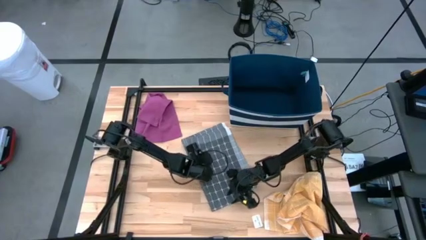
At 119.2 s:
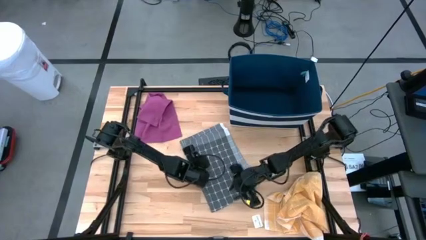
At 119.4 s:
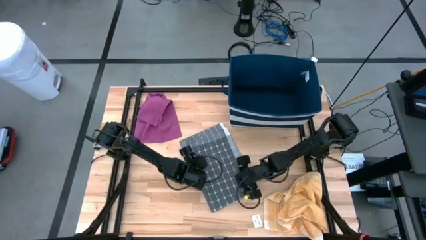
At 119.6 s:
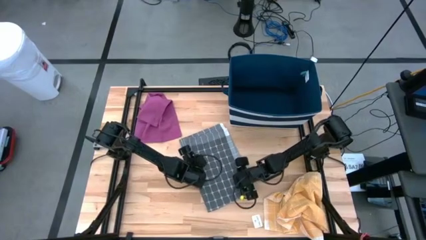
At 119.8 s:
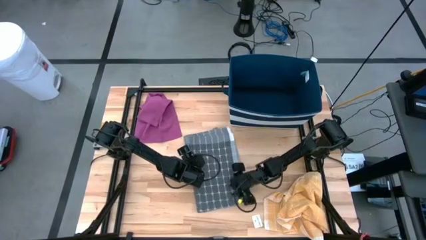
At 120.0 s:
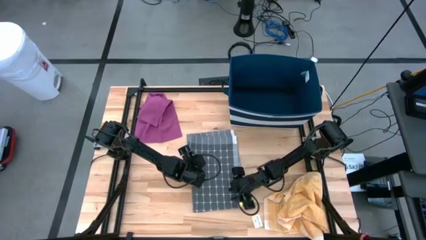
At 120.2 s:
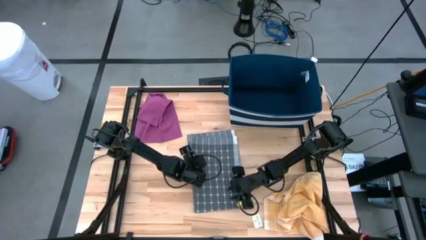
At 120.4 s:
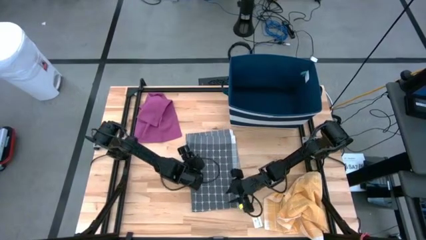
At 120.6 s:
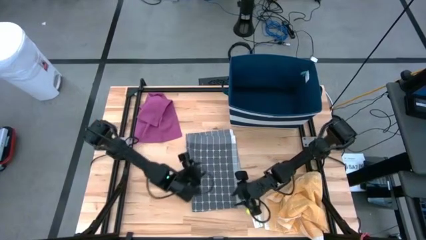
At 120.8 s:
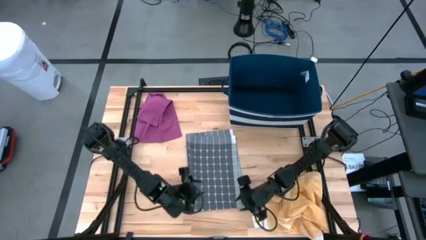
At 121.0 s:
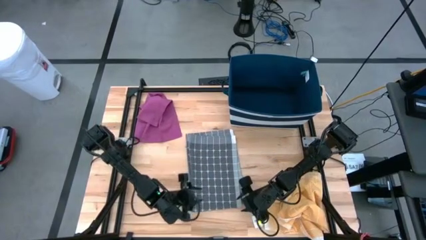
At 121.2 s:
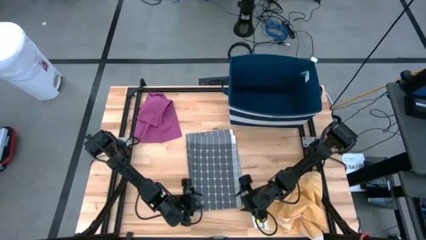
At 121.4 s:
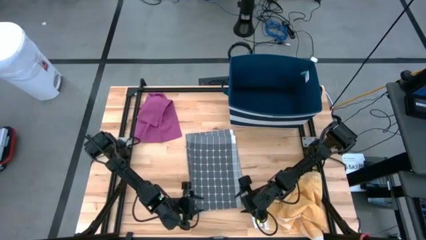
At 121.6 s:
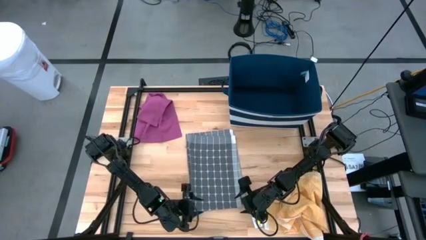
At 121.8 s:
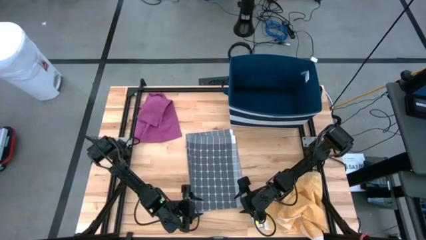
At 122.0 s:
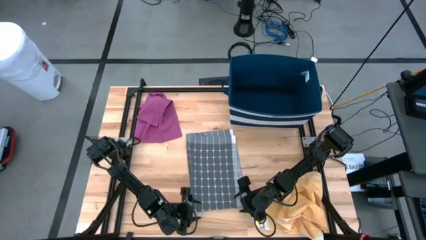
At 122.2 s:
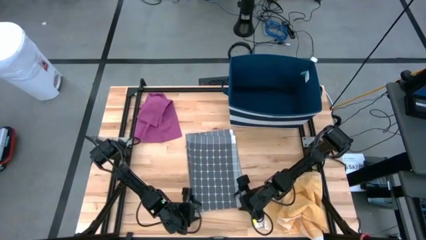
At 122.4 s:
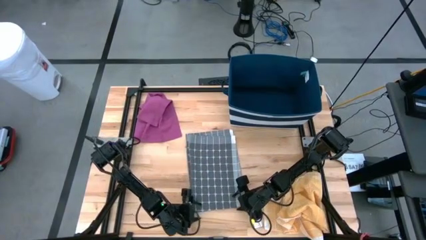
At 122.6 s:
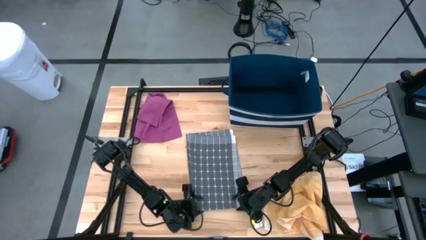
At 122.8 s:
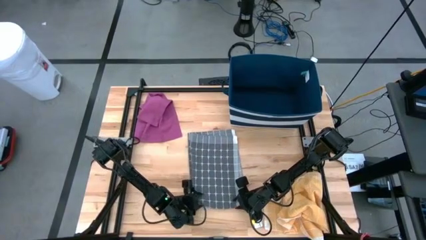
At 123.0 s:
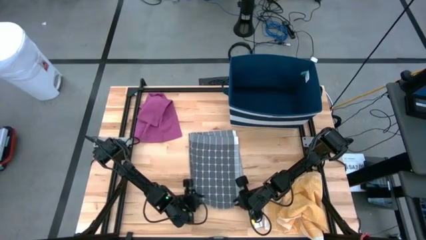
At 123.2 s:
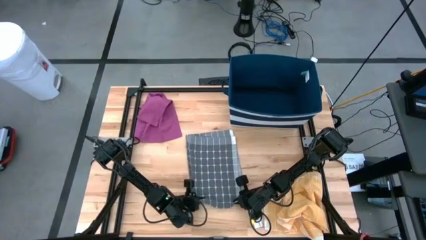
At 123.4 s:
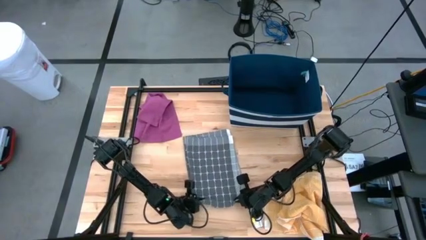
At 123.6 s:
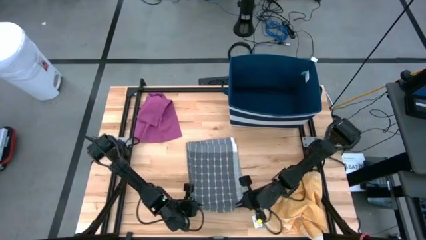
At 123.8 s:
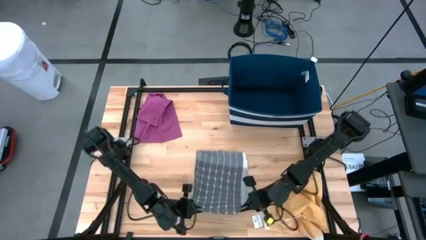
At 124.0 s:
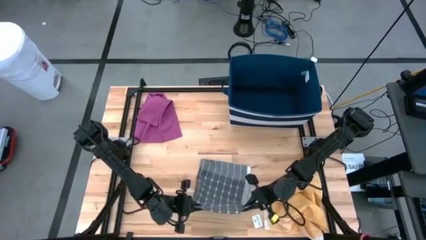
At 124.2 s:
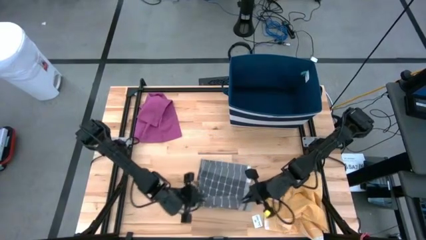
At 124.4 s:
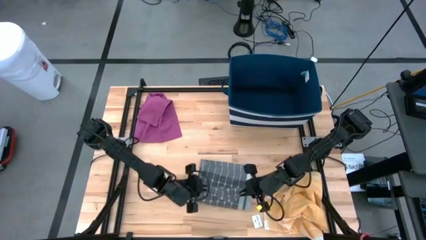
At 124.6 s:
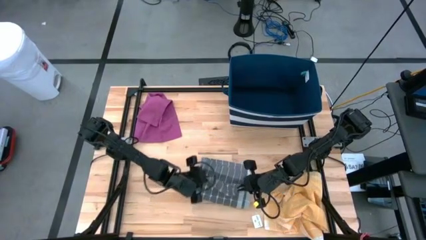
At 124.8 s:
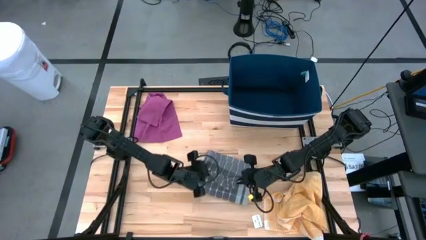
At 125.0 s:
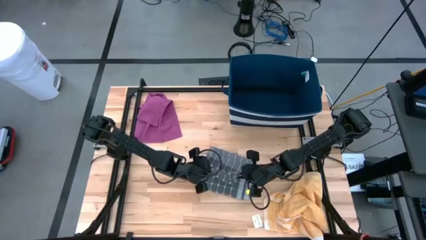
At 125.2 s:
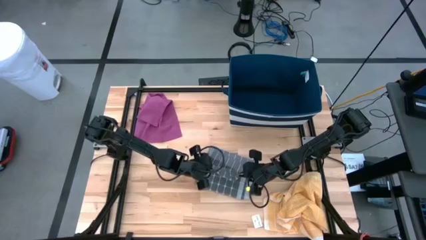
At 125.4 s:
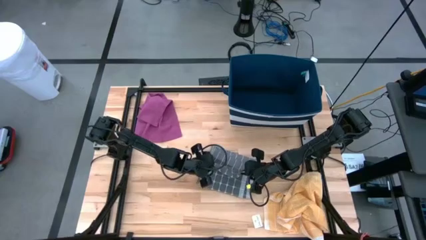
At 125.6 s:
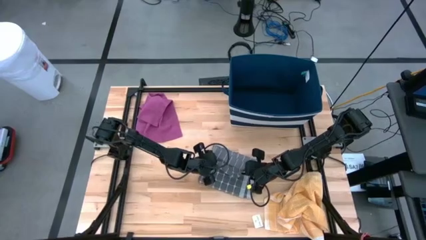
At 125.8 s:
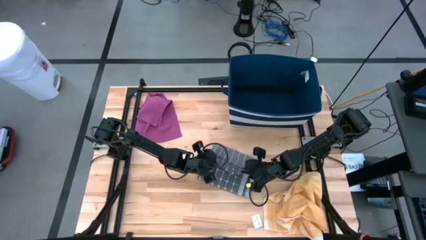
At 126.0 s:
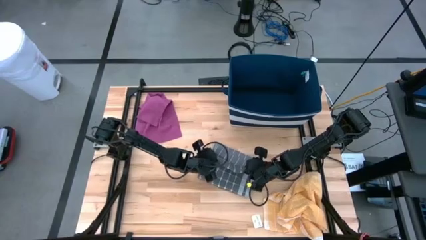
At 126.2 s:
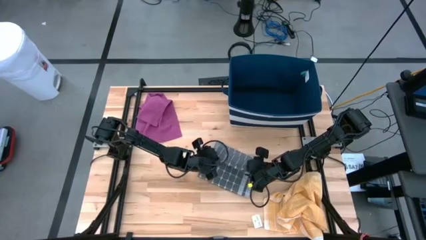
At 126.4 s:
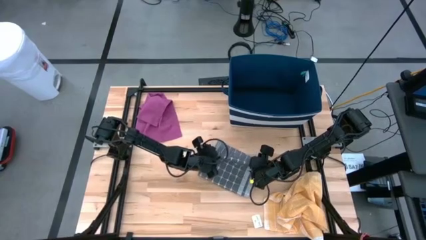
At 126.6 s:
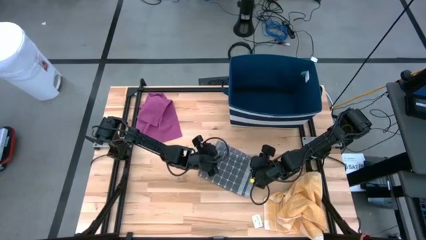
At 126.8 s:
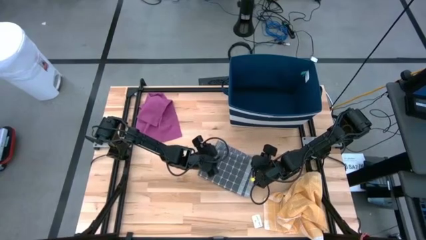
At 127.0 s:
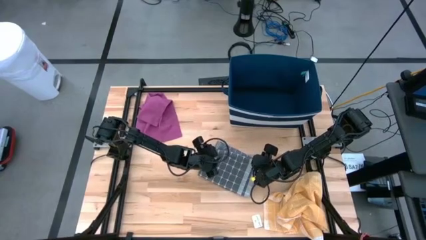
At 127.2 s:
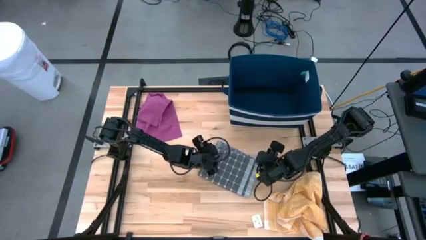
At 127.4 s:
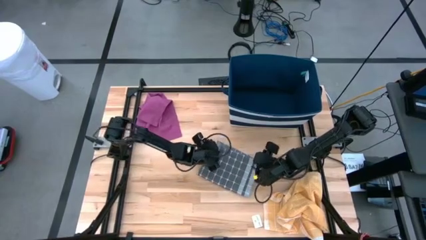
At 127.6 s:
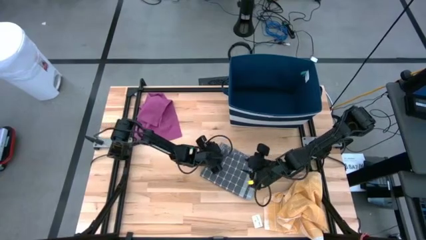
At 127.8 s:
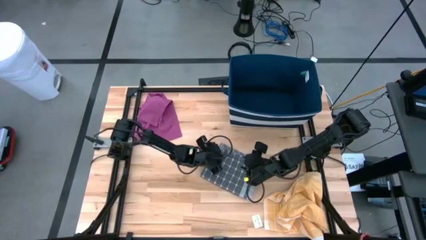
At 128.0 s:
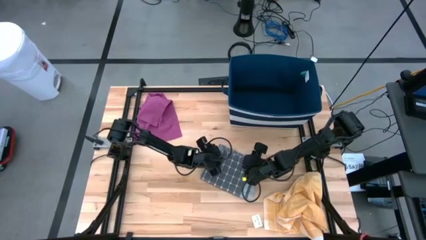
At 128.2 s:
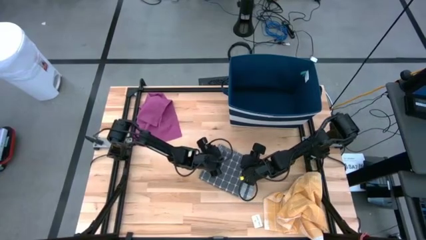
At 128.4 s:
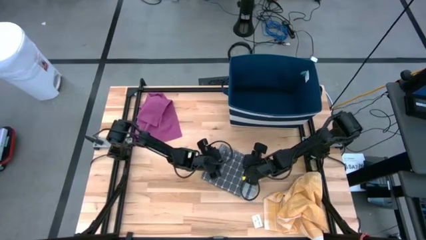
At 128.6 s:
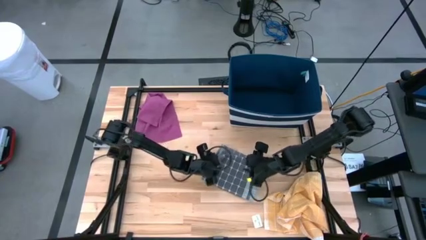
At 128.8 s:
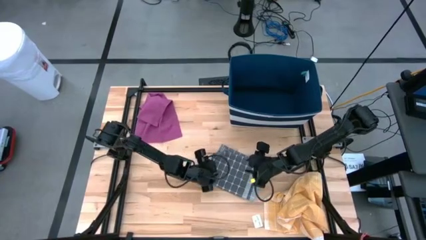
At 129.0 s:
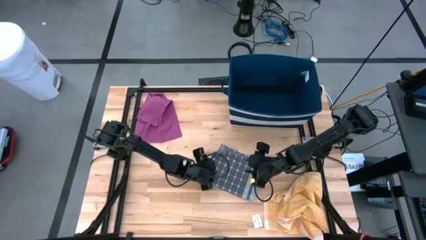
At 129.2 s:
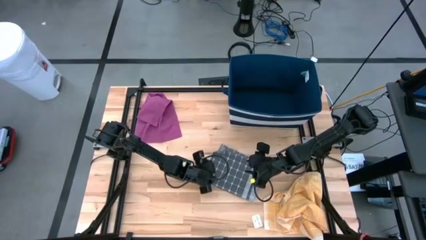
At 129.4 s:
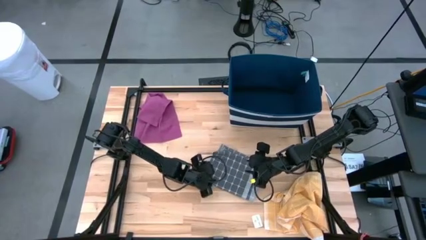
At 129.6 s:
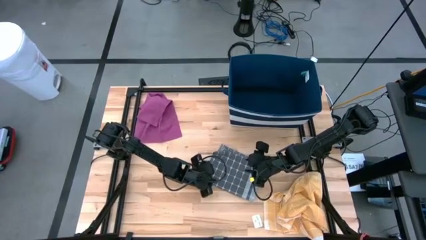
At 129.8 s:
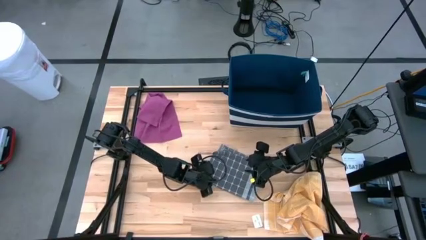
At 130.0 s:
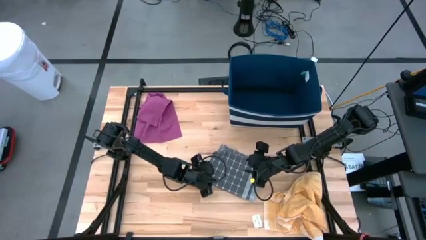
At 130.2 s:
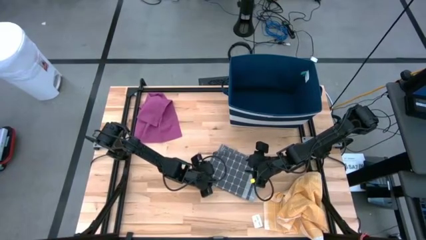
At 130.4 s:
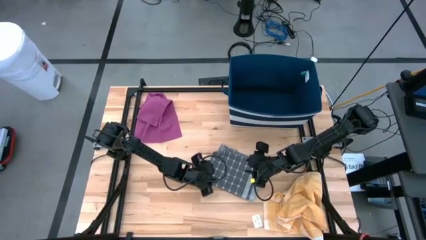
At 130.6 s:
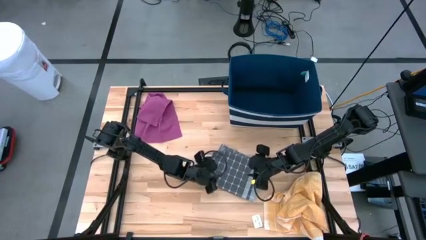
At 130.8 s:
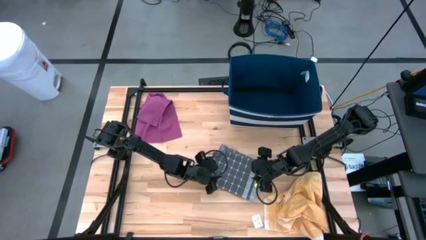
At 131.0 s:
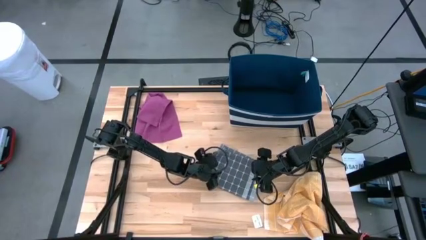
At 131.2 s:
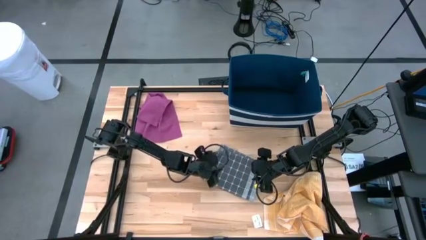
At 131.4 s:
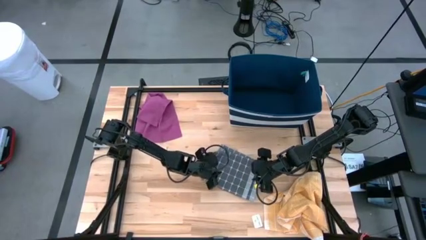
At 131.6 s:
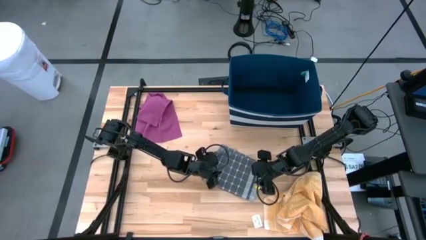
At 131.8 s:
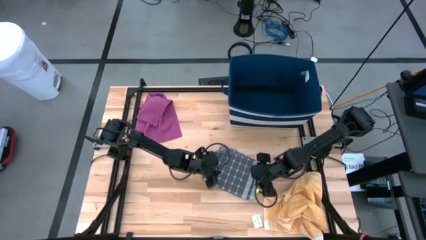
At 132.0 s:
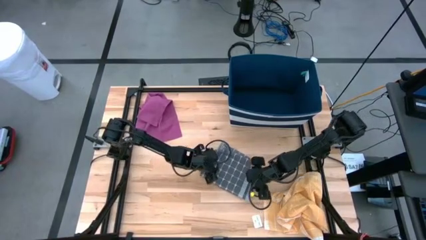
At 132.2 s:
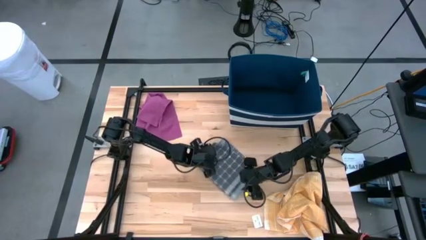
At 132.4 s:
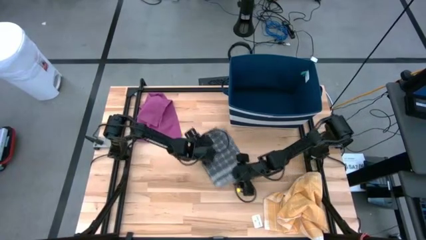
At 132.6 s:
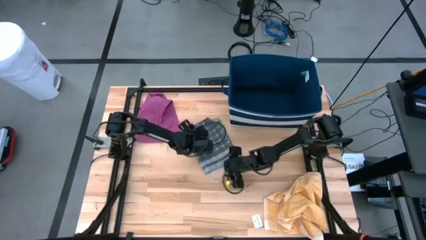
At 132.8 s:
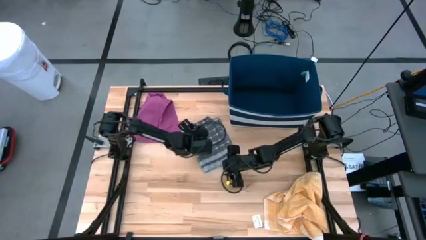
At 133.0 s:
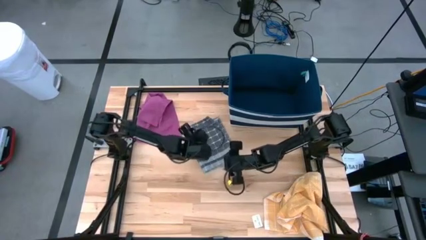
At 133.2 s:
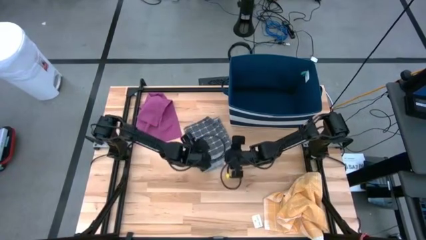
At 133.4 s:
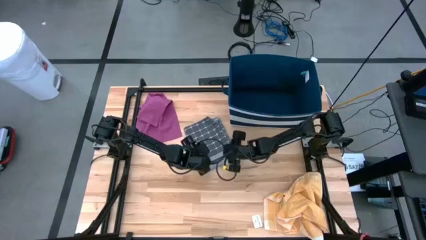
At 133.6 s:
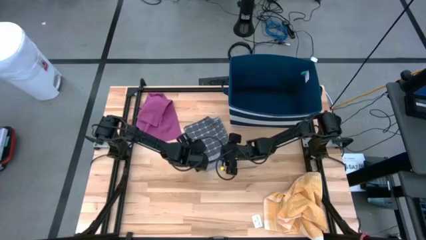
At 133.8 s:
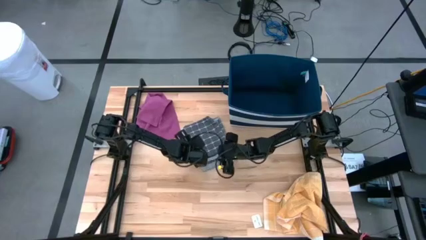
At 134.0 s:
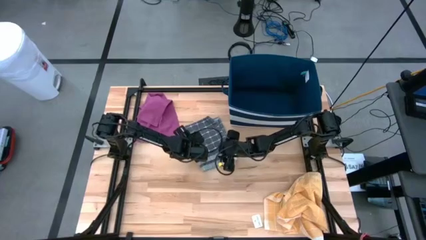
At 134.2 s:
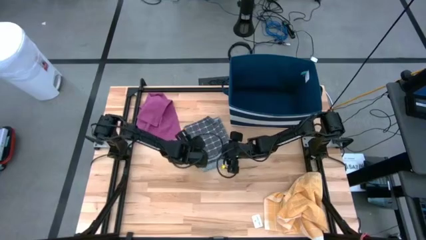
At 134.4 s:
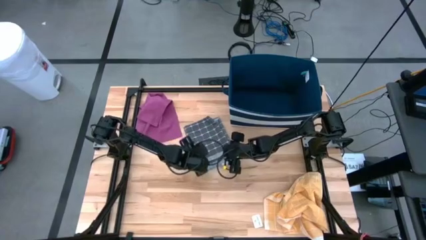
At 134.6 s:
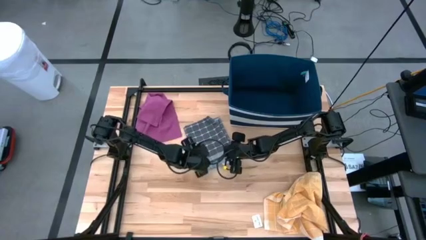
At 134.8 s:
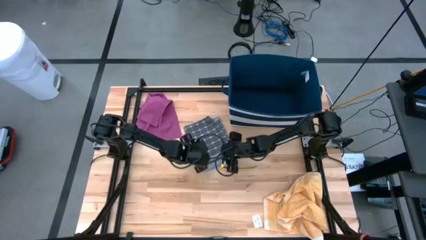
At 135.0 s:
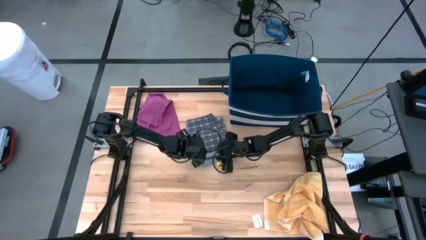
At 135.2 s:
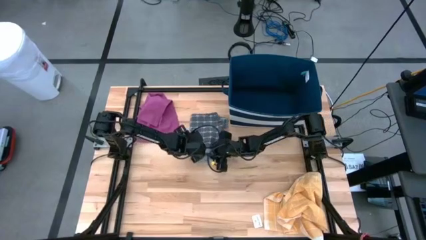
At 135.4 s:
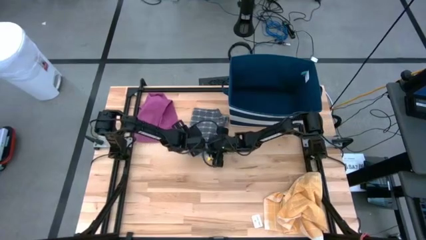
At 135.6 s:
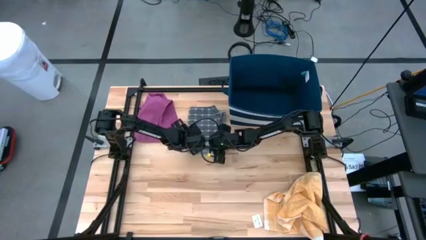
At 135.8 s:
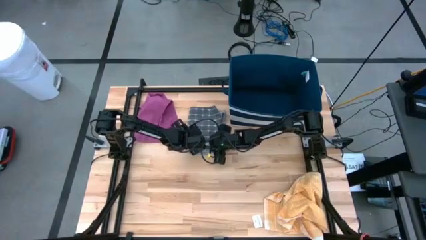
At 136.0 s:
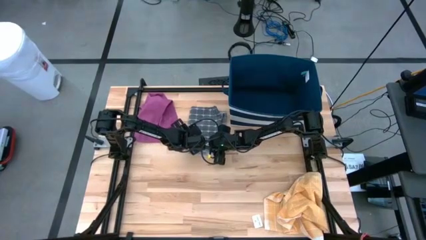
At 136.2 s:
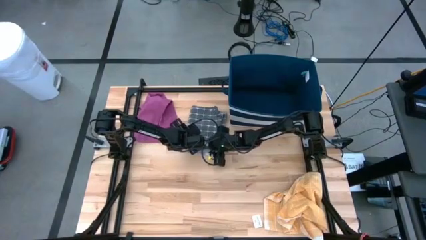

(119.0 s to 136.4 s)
Task: Fold towel
Fold the gray checkered towel
